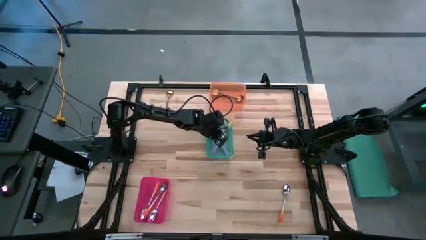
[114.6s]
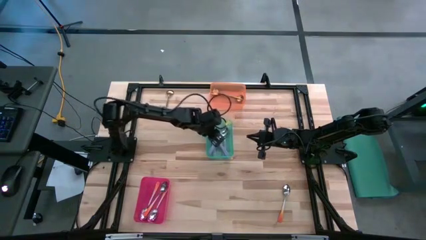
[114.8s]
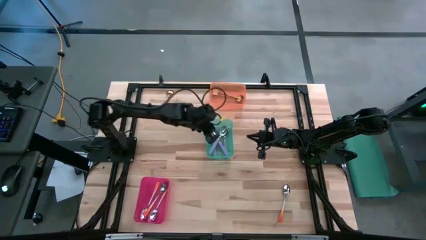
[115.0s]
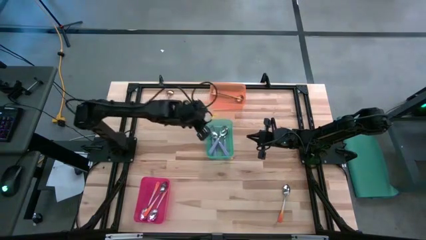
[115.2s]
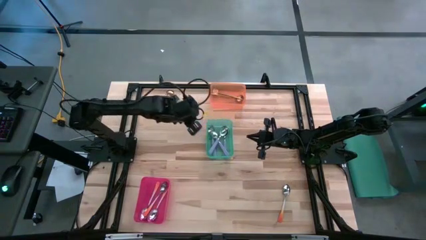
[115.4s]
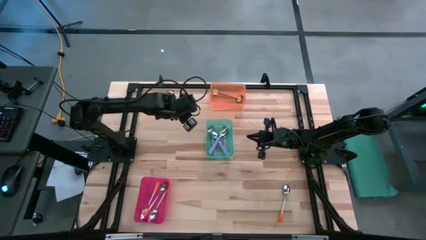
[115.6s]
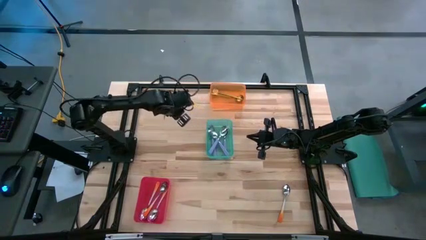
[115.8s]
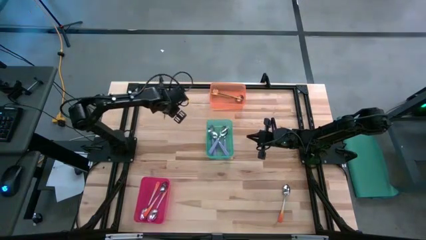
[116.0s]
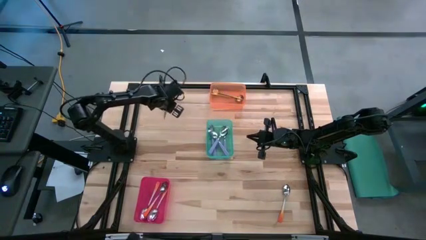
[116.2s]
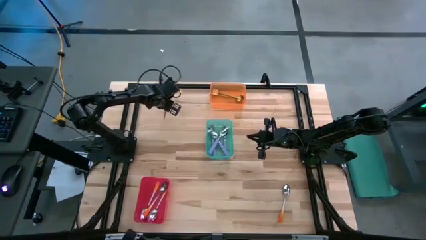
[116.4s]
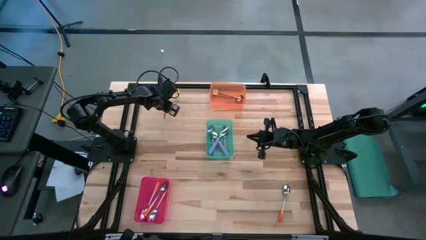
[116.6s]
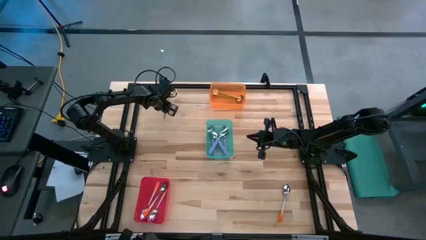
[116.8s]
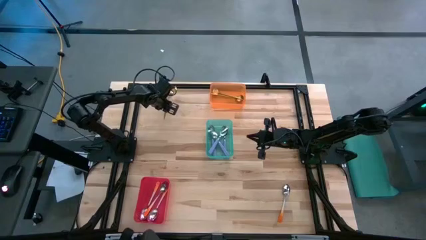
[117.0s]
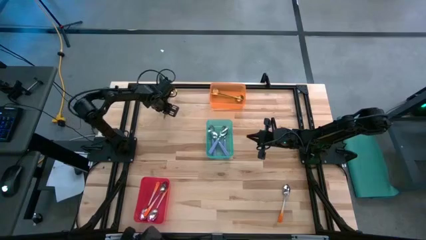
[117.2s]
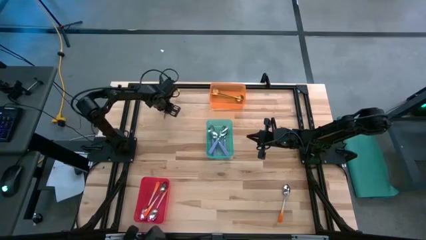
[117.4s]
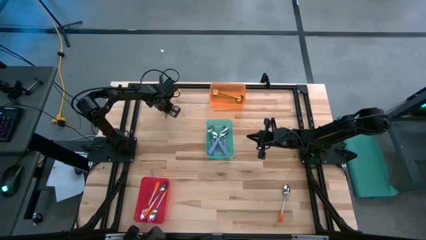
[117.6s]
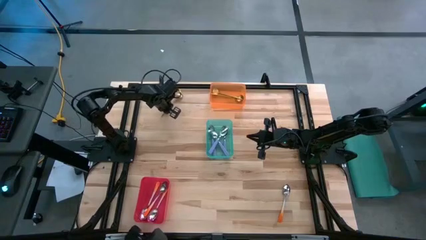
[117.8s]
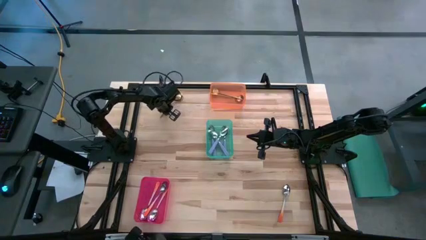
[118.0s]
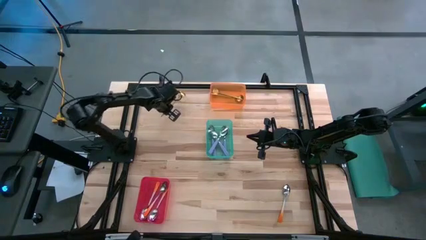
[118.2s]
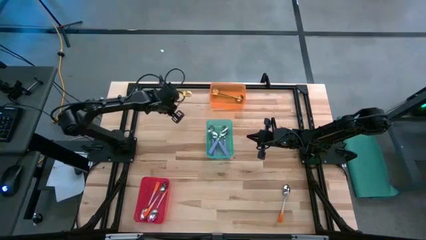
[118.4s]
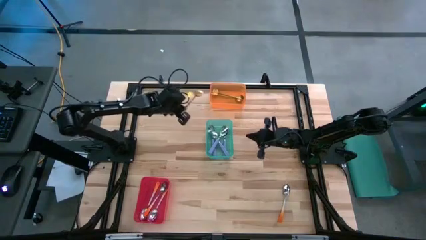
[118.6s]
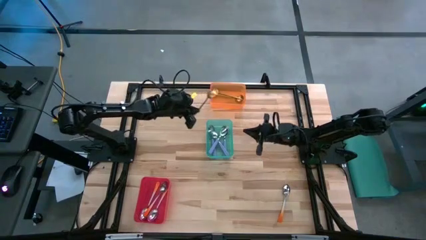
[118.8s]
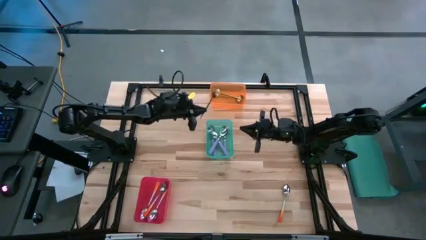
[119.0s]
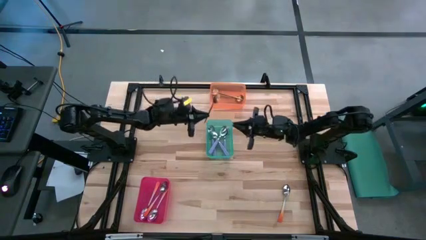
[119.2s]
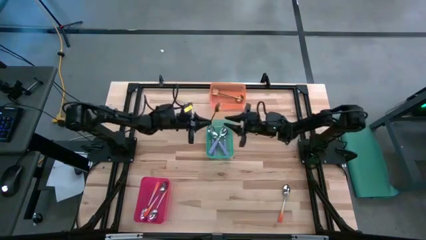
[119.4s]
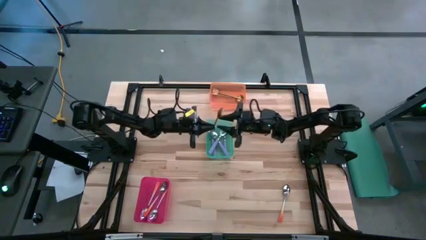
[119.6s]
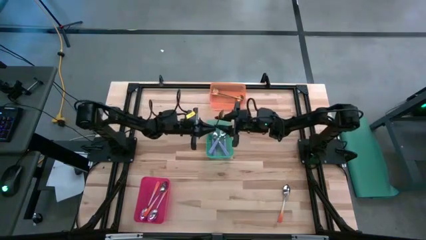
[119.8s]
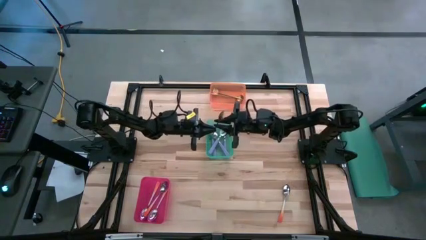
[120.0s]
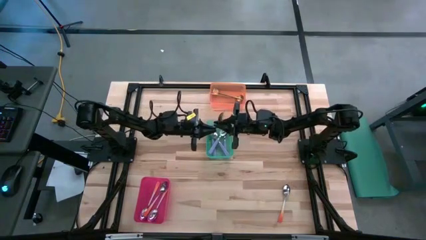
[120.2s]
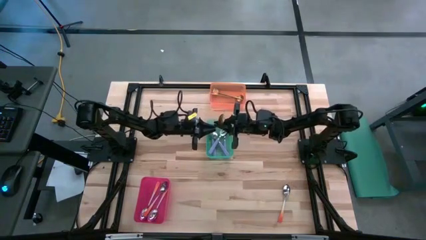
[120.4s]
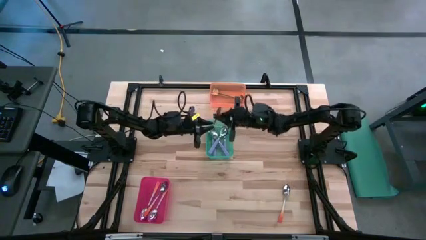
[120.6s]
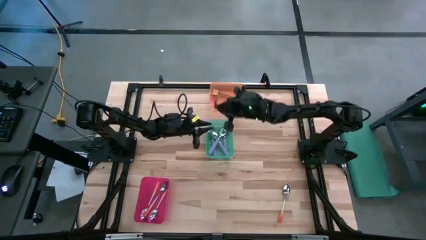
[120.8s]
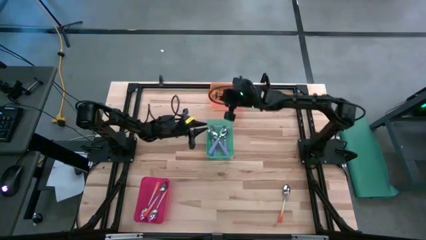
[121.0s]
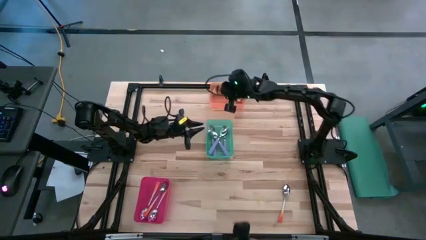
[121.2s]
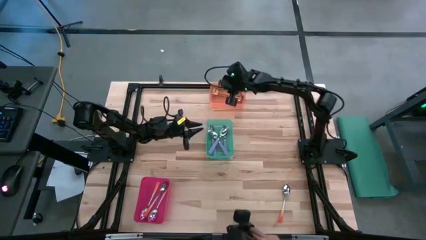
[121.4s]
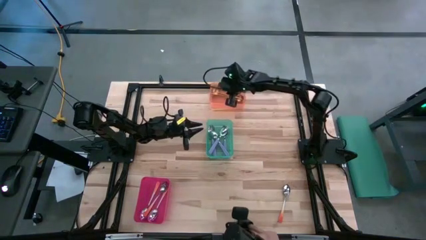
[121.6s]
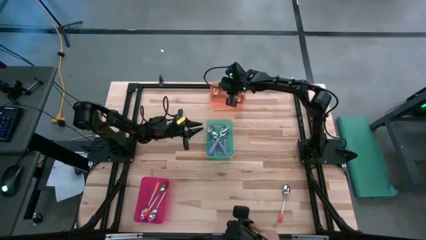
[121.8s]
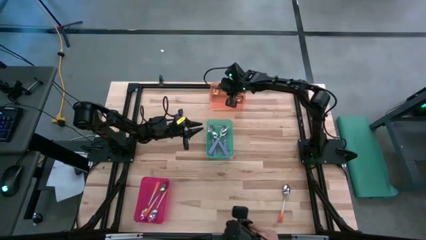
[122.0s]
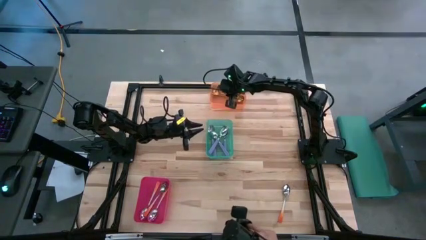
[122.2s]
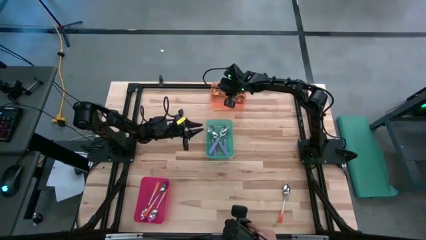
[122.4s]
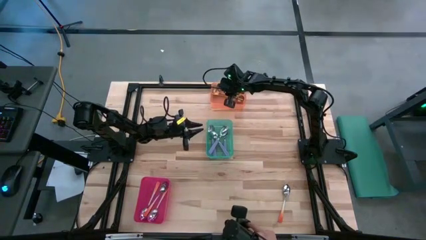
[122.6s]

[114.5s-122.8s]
Task: Sort silverware by color (type)
Put the gold spoon into the orange bin

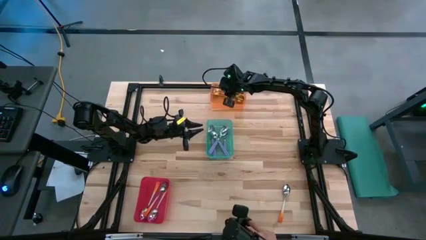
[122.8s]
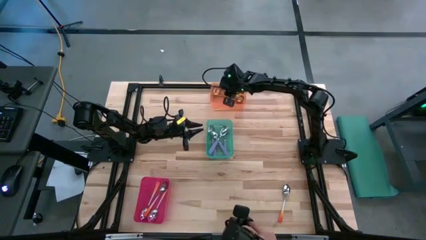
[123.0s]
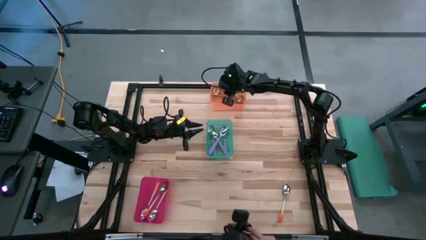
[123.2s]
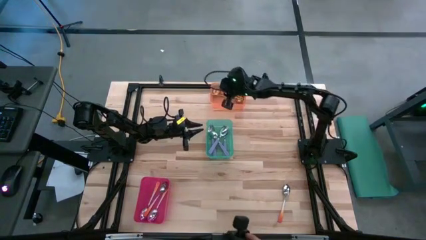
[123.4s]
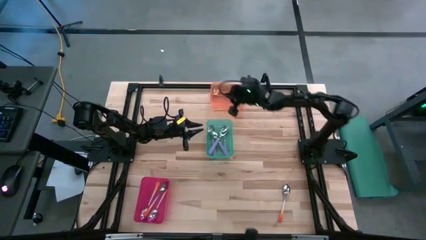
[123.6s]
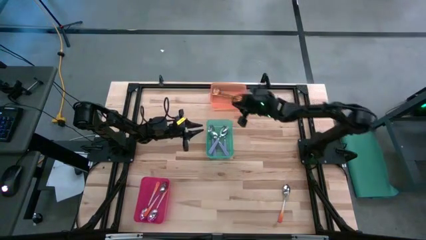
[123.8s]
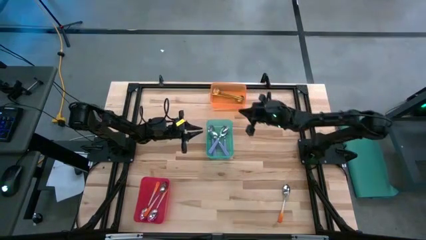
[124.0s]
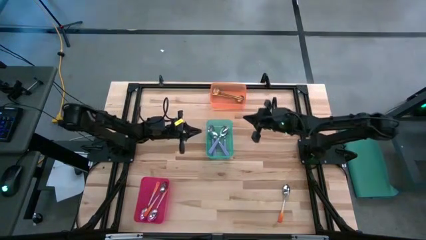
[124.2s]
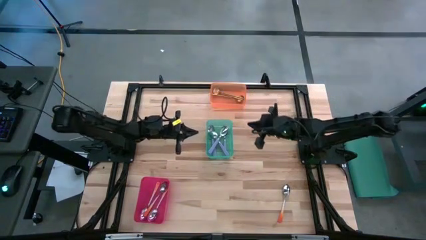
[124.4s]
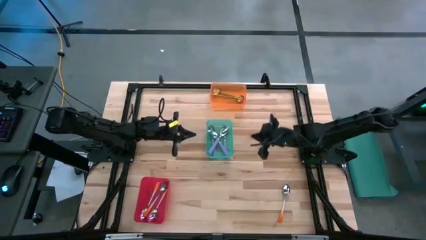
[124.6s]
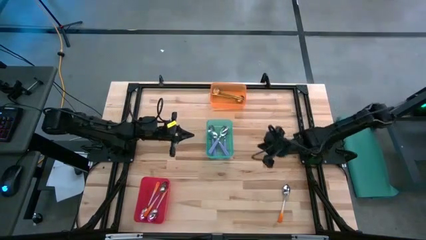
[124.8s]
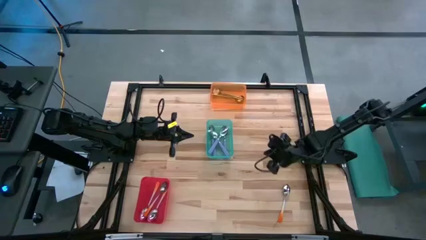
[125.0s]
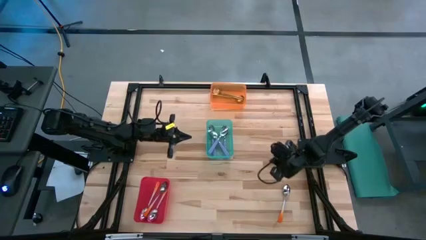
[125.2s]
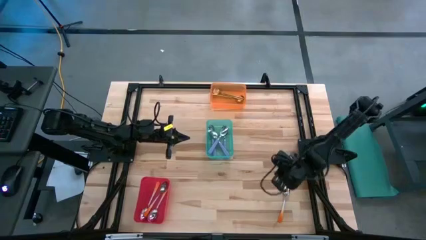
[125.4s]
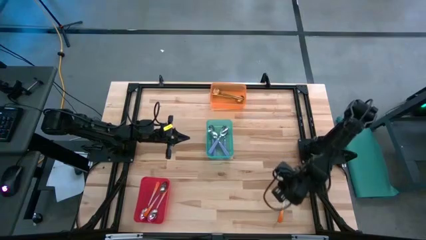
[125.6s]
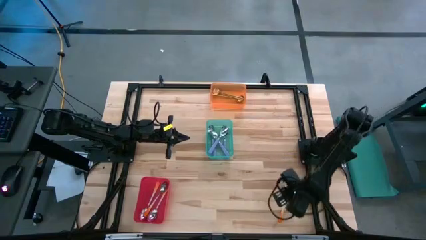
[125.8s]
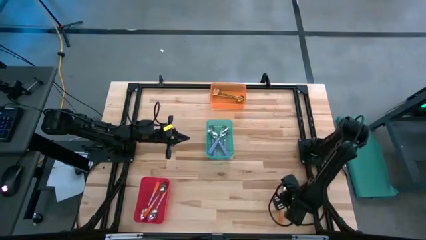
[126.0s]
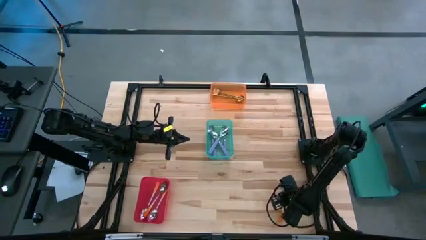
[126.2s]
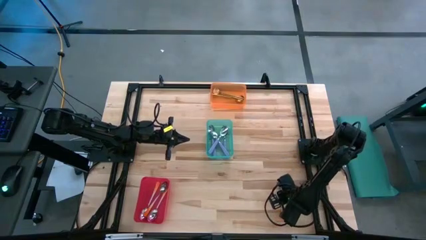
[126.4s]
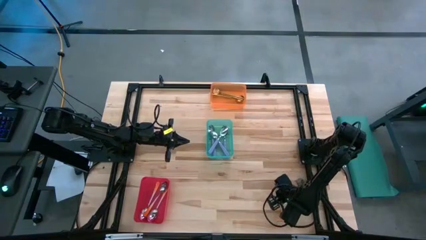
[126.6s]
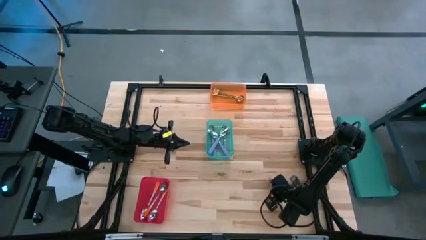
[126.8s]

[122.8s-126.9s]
Put the orange spoon into the red bin

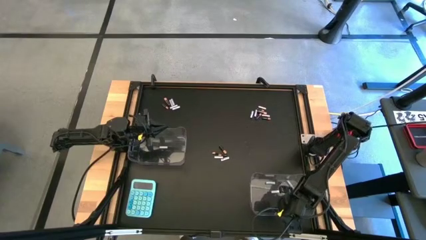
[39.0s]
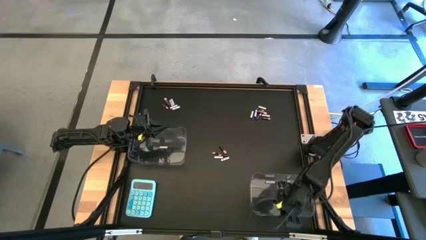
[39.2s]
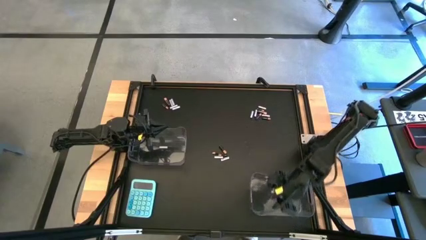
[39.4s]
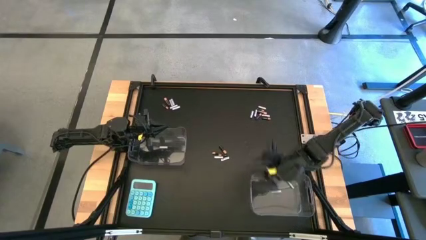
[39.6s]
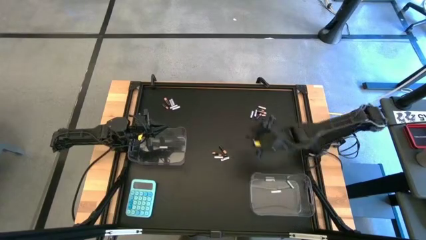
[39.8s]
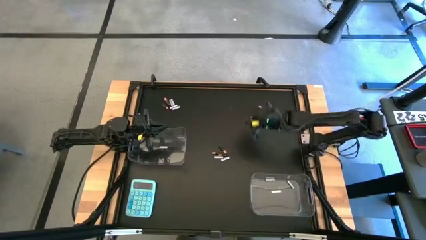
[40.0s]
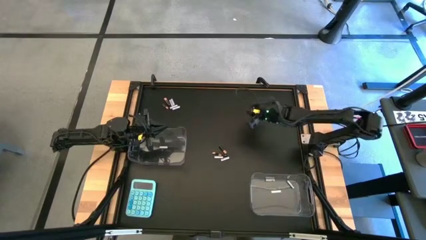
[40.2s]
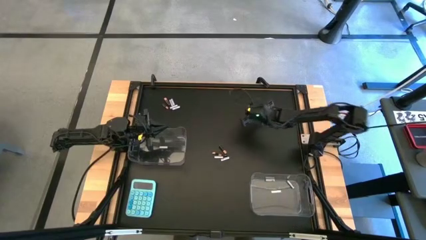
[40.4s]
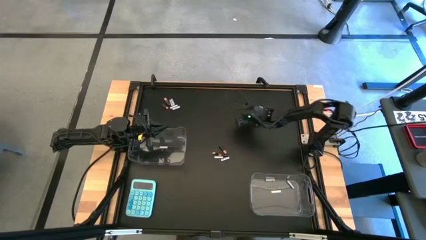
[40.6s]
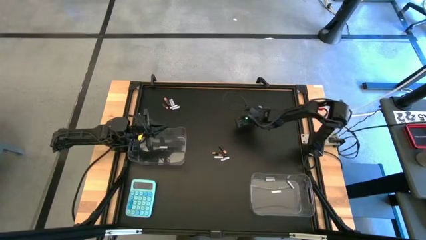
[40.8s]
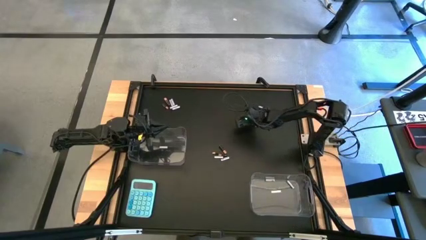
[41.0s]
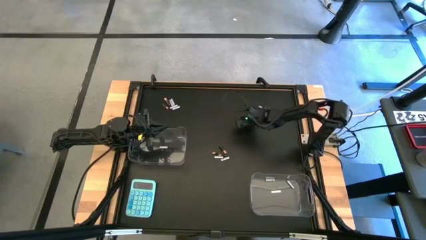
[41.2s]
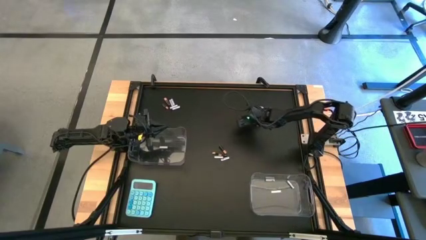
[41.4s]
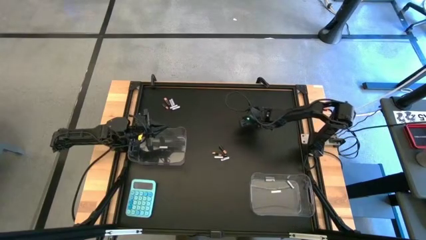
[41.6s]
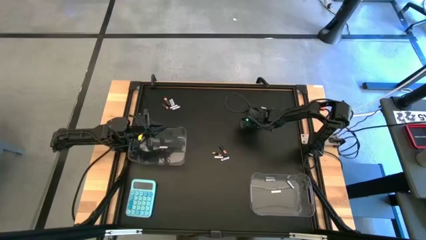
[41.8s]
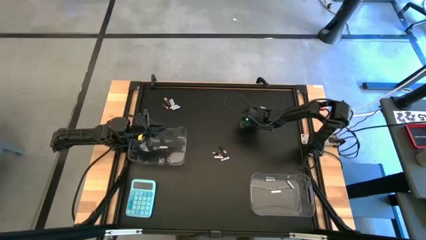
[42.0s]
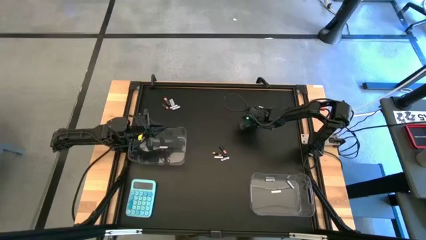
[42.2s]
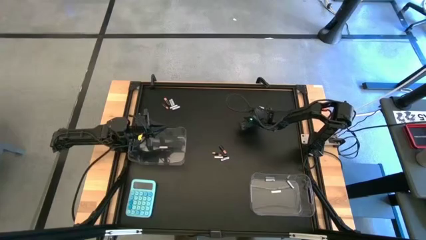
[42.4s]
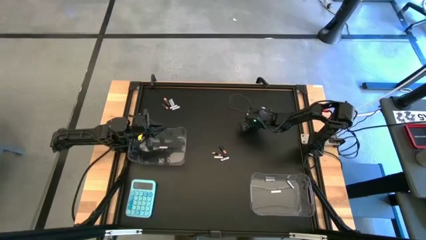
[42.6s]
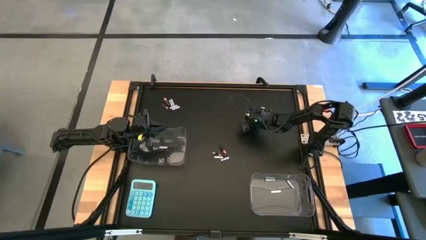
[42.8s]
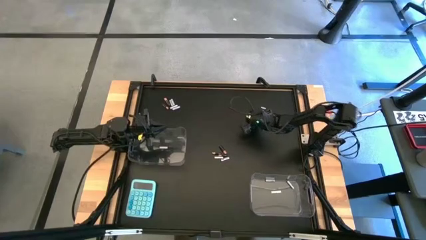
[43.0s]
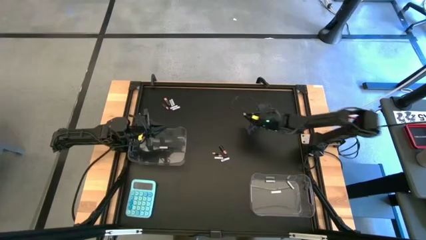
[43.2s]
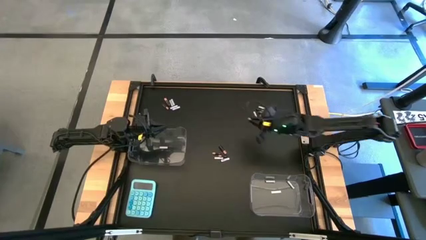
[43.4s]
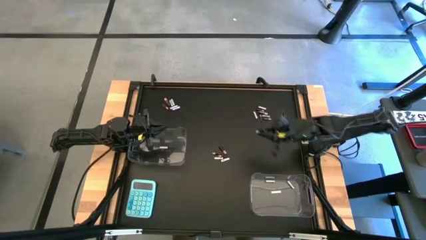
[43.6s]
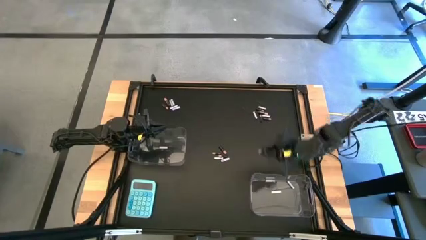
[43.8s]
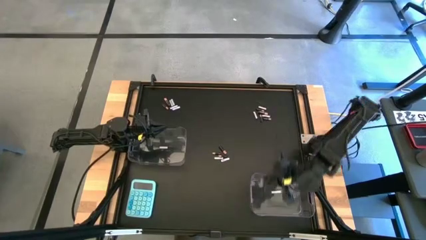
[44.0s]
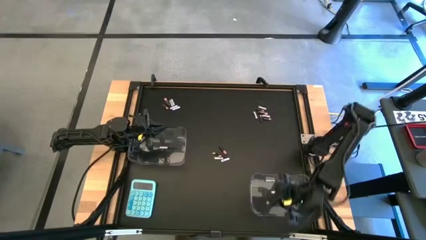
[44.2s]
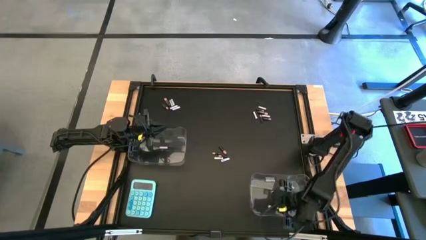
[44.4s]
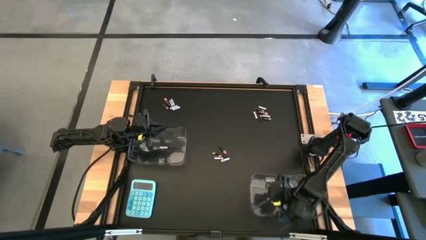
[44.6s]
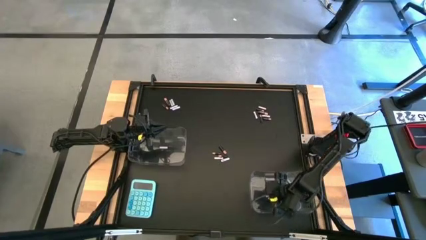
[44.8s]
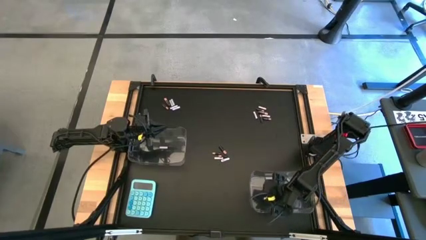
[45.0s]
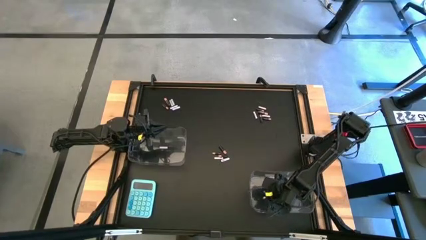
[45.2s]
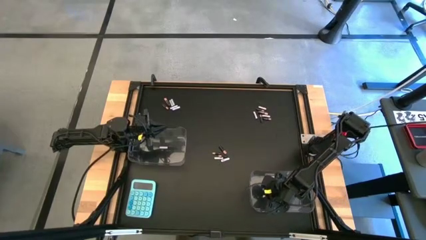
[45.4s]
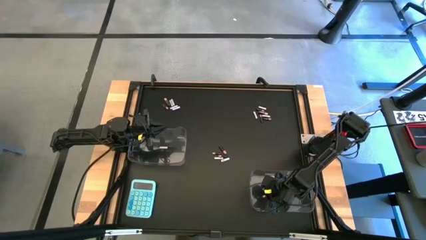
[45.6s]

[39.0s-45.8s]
Task: Sort batteries
Put the white battery into the right transparent bin
